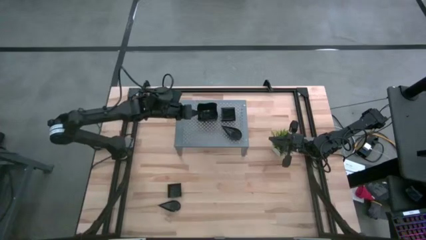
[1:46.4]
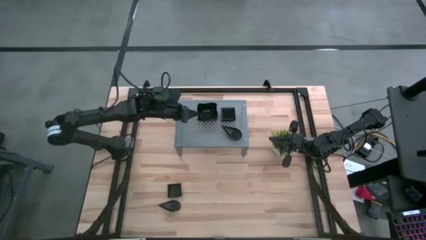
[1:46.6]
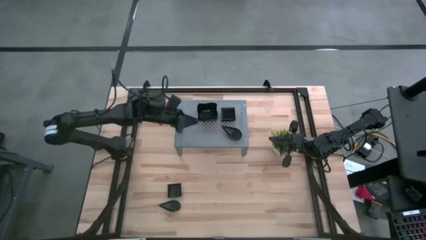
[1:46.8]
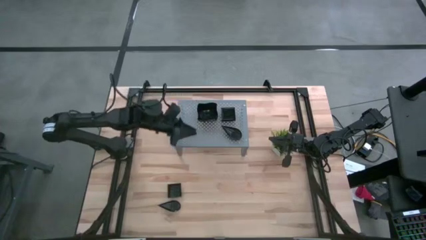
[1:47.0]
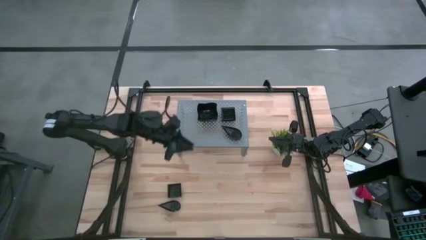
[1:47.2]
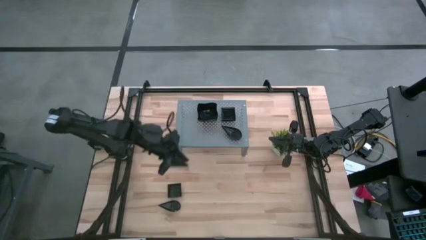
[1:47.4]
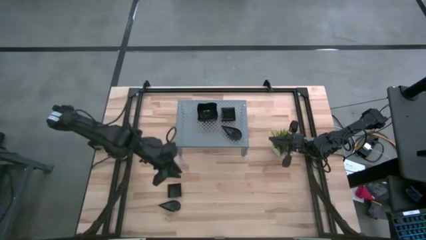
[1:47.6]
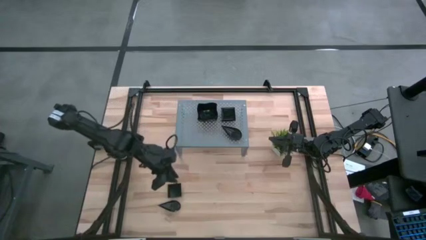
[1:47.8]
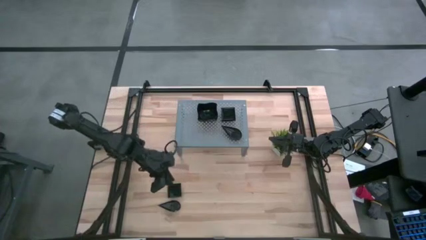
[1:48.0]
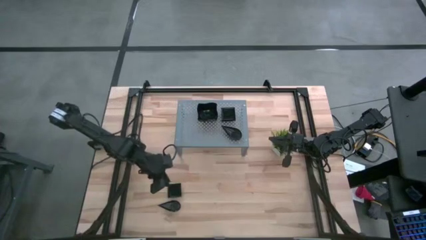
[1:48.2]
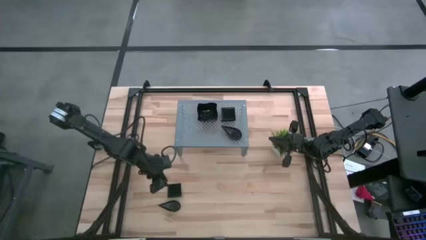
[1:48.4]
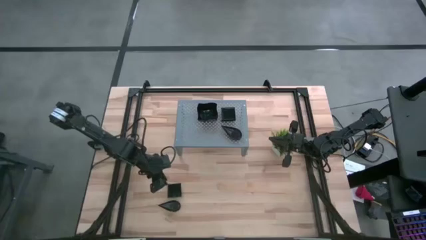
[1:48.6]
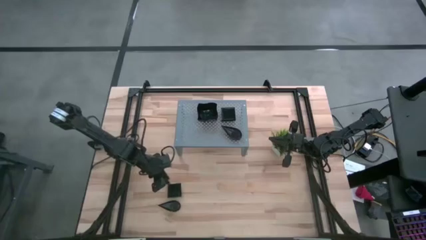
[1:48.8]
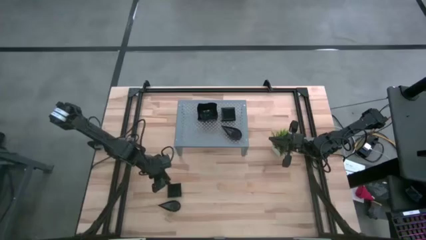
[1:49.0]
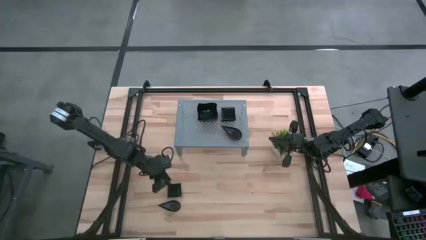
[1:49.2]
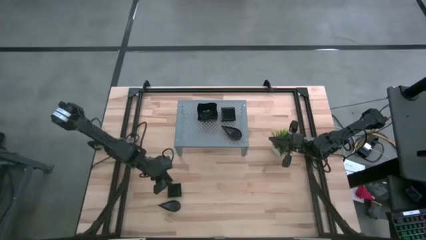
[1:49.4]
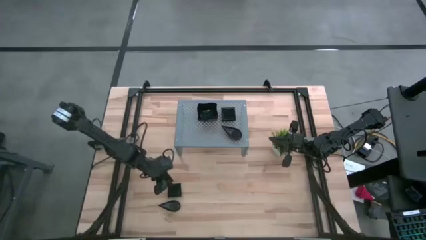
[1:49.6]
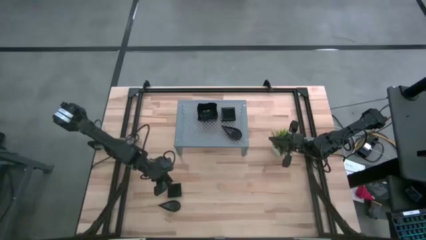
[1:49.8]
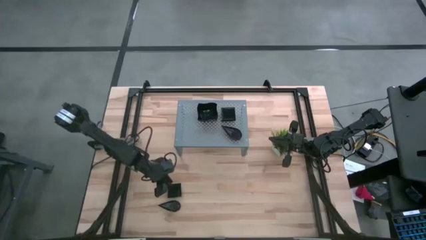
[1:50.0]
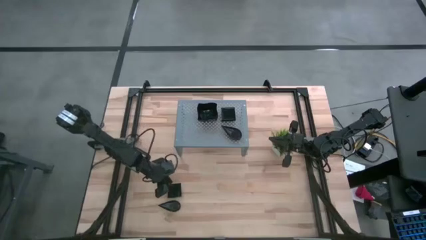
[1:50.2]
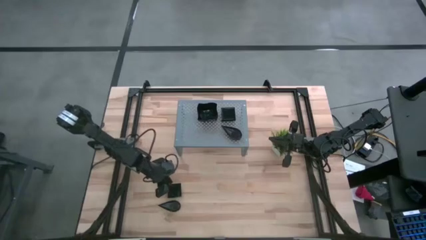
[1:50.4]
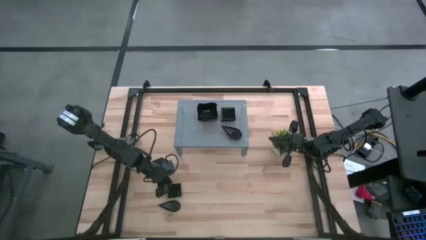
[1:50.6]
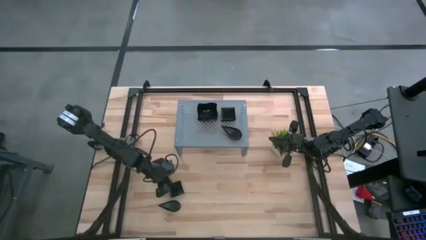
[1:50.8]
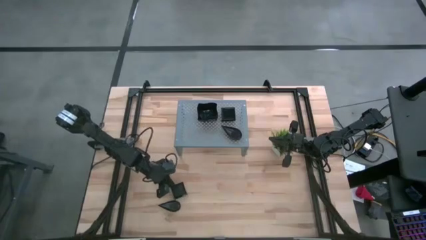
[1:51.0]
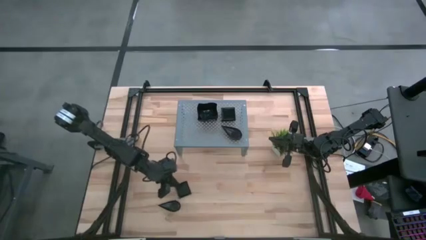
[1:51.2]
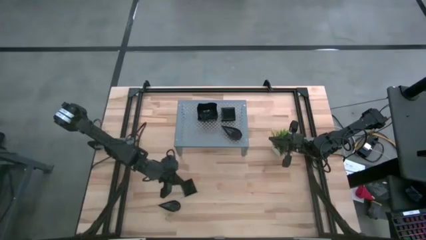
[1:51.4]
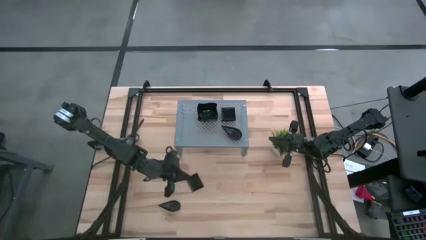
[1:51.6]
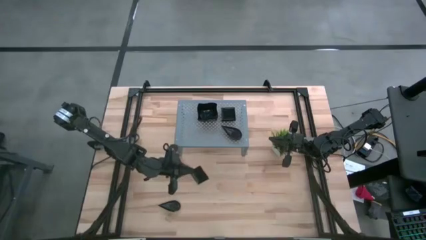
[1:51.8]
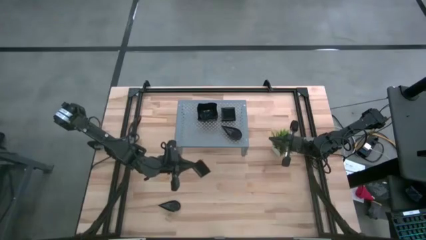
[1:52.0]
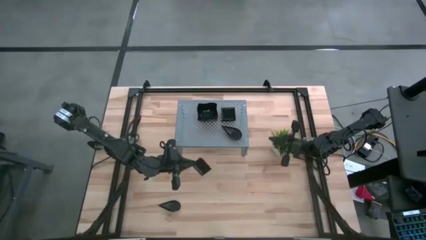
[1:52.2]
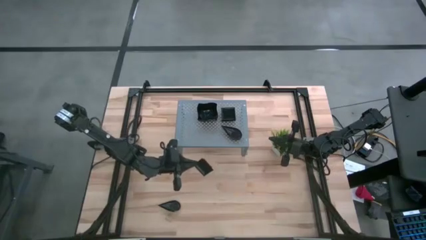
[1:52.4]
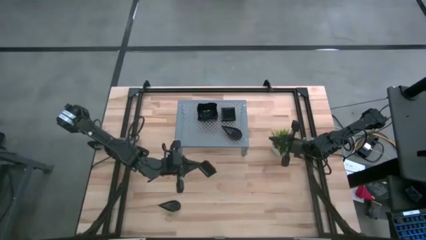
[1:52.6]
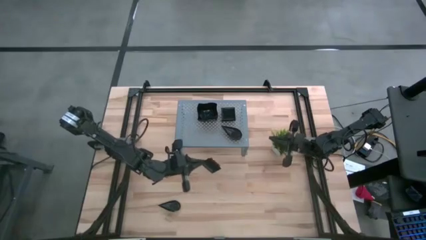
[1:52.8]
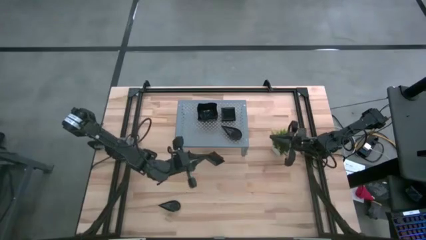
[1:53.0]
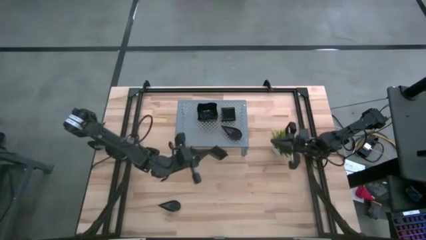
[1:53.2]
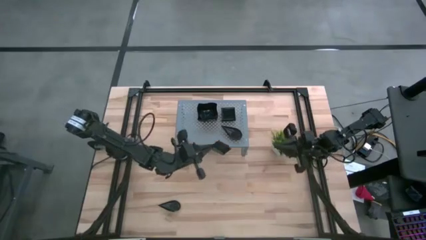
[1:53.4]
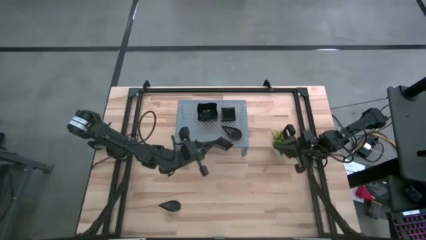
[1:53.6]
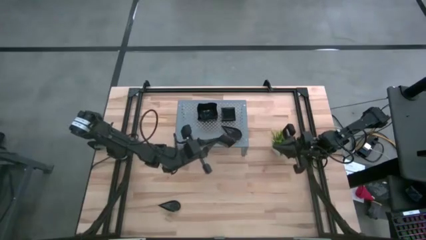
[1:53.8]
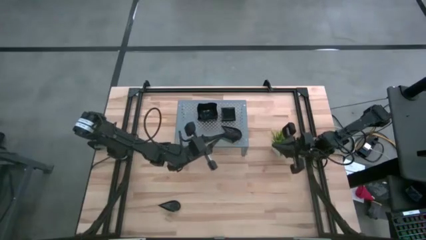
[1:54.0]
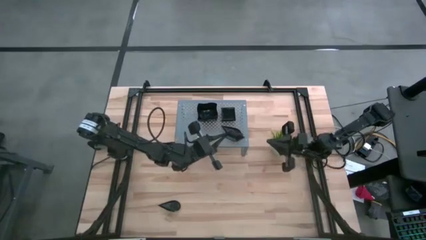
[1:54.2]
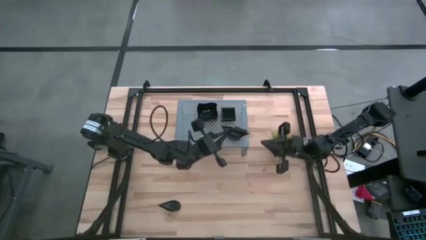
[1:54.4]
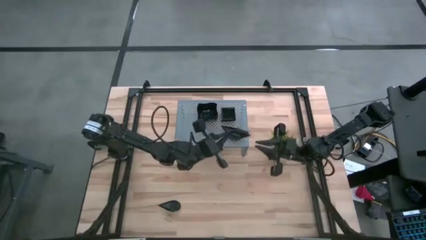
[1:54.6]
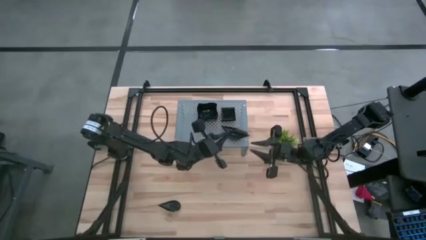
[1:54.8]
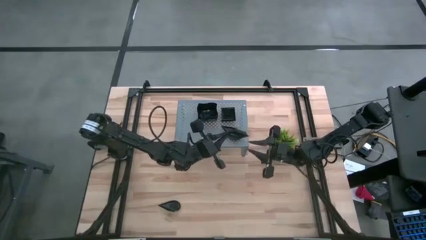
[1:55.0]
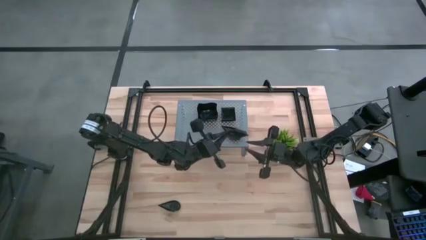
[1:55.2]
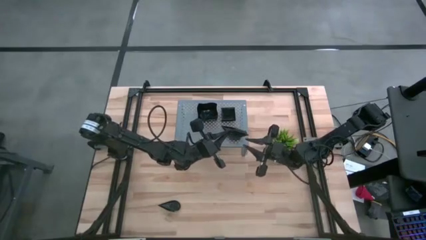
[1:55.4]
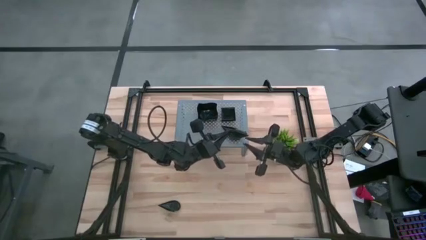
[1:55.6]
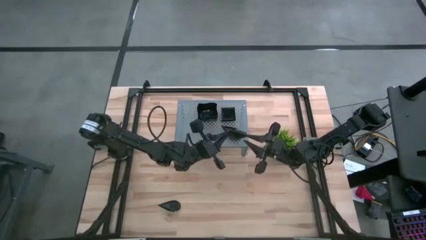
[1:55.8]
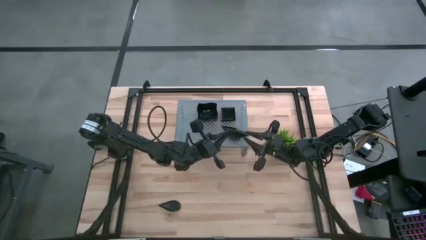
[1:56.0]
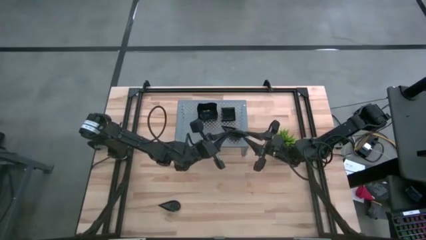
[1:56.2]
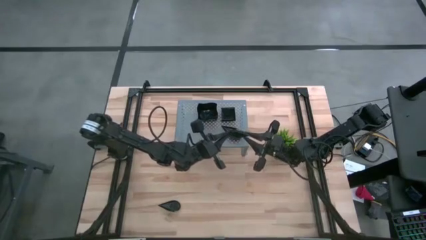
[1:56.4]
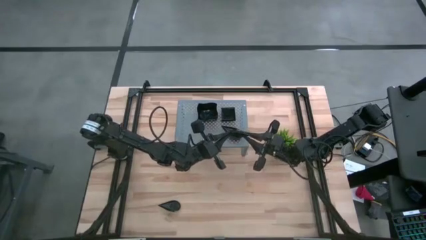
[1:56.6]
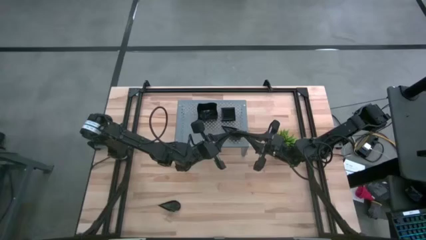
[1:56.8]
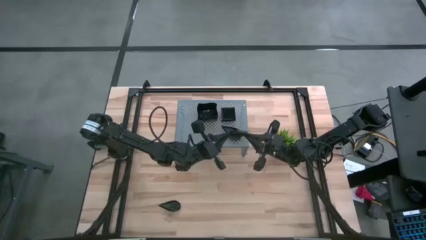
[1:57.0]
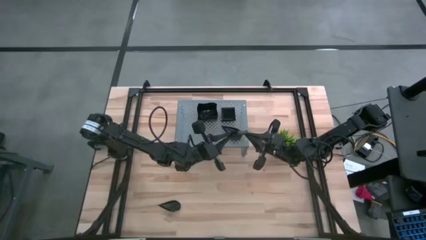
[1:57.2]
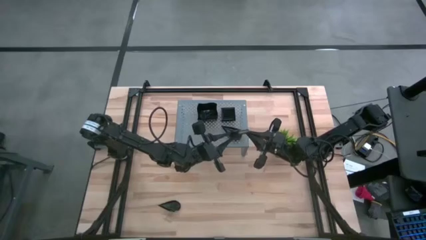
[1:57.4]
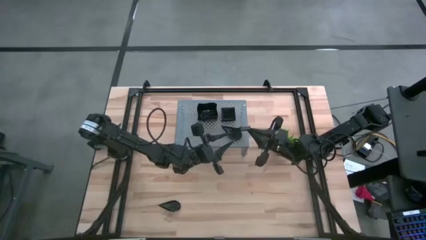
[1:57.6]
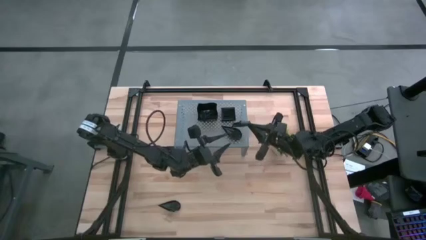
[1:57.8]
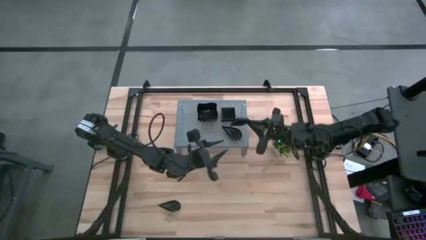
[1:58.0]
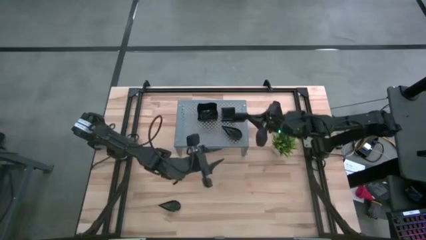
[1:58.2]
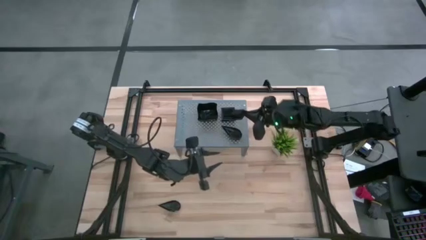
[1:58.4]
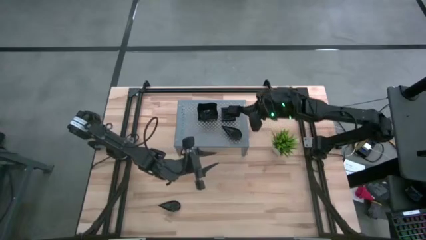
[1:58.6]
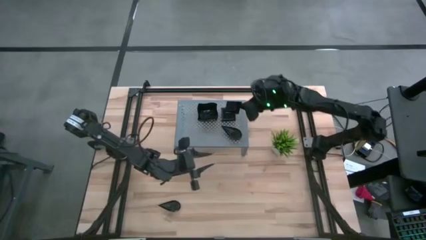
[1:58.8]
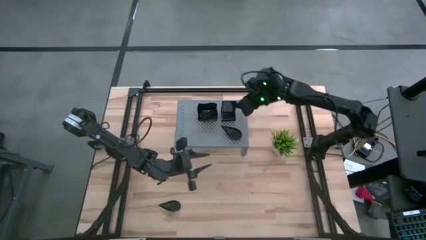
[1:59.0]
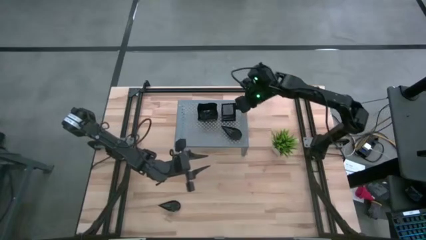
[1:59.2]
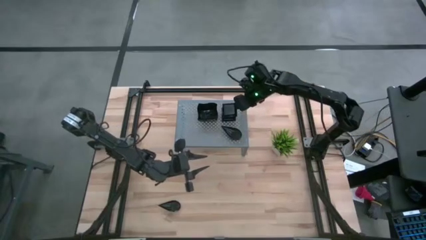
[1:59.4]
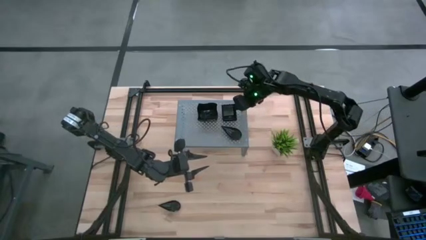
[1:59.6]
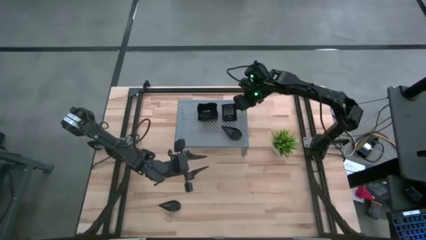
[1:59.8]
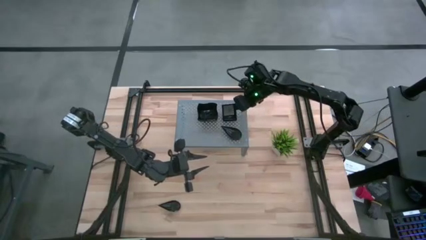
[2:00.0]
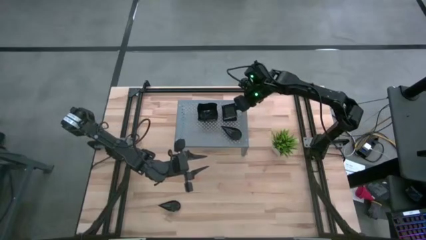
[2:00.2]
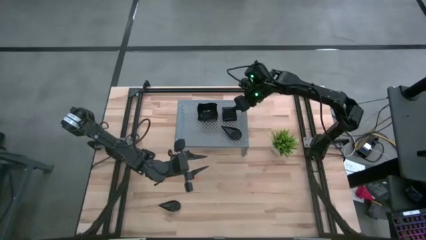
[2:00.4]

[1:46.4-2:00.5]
Task: Pick & Place Mini shaped plates
Stack the square plate on top of the square plate on the shelf

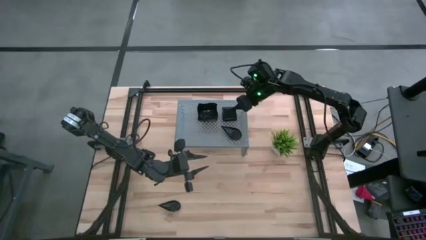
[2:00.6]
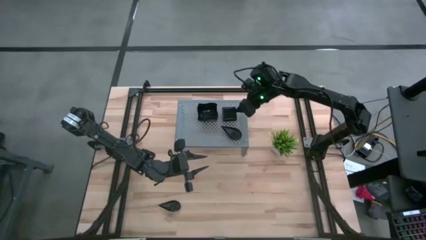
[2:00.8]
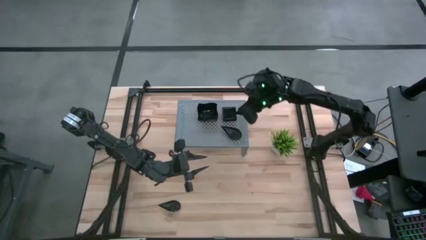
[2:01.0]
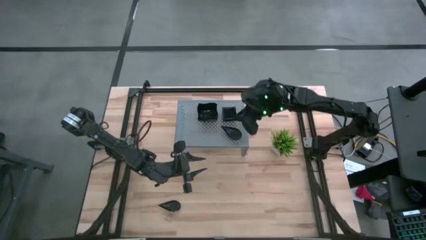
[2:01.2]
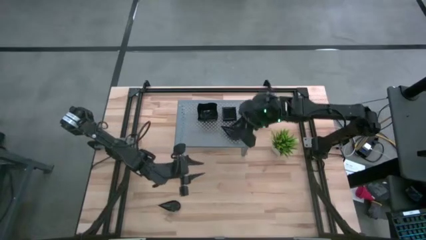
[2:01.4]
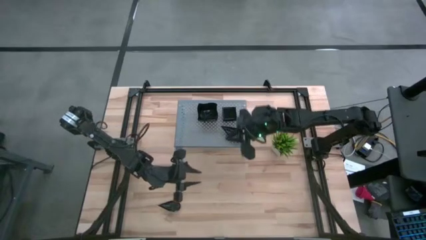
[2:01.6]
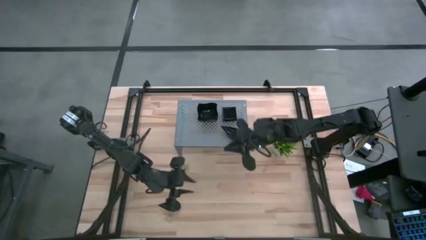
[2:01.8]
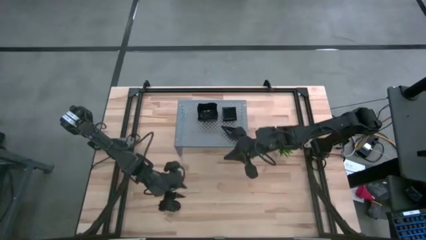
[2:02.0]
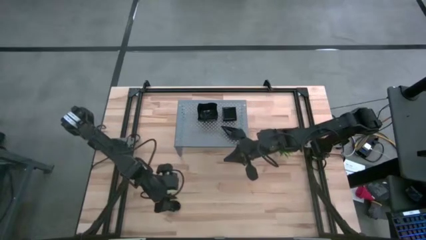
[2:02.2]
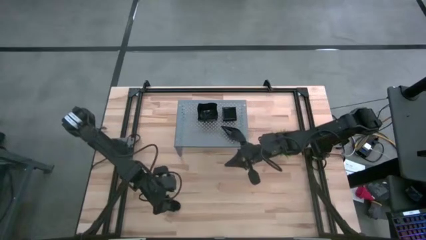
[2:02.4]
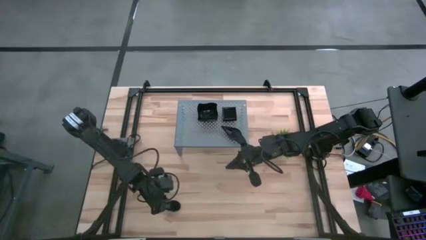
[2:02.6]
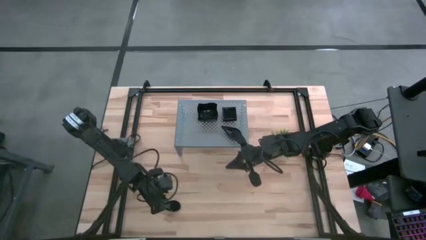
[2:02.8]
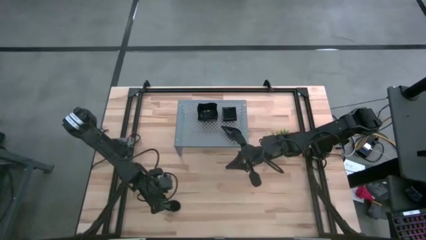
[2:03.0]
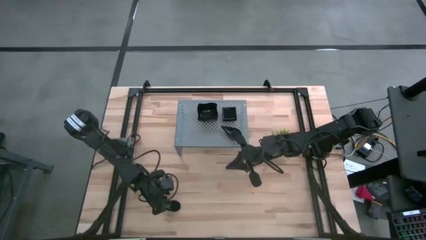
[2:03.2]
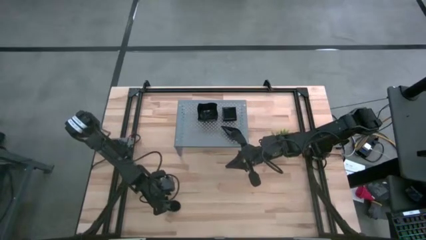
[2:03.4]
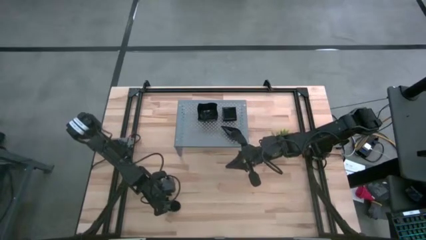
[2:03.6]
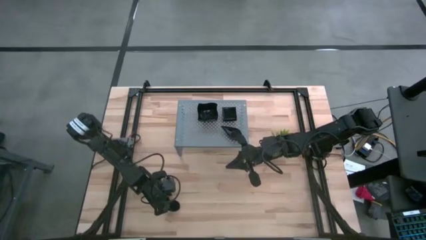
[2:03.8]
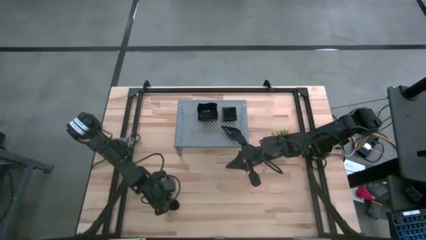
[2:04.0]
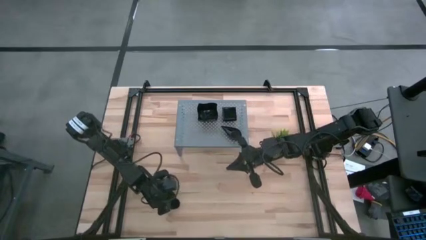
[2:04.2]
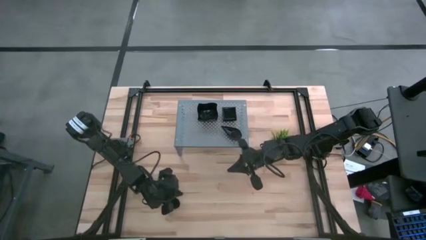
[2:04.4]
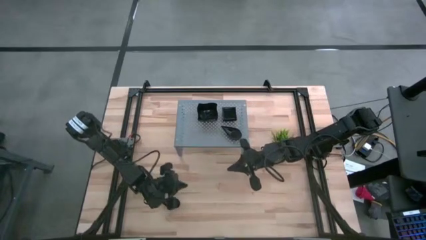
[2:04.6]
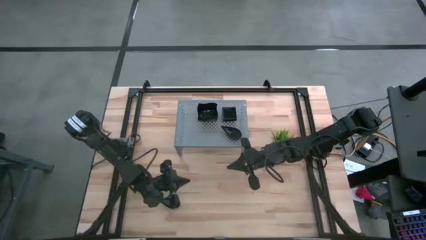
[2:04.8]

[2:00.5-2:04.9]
Stack the drop-shaped plate on top of the drop-shaped plate on the shelf
